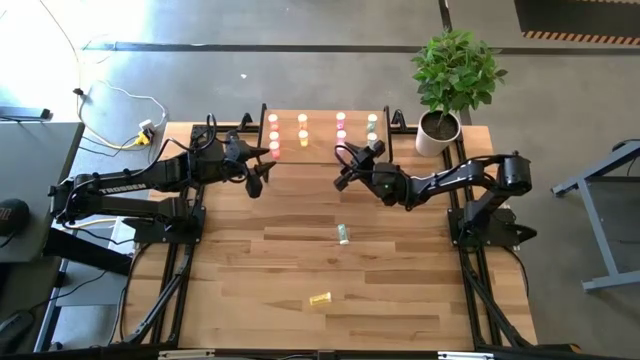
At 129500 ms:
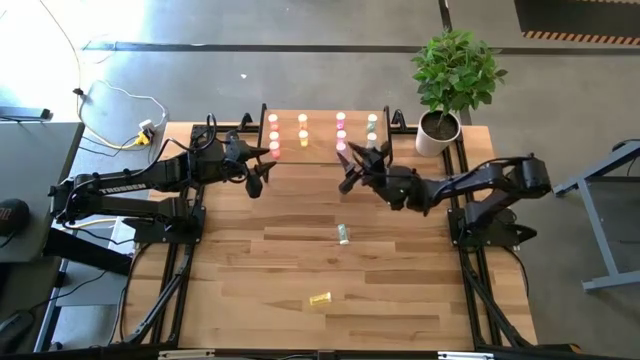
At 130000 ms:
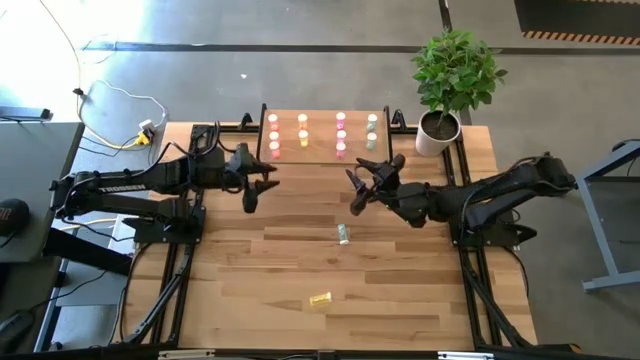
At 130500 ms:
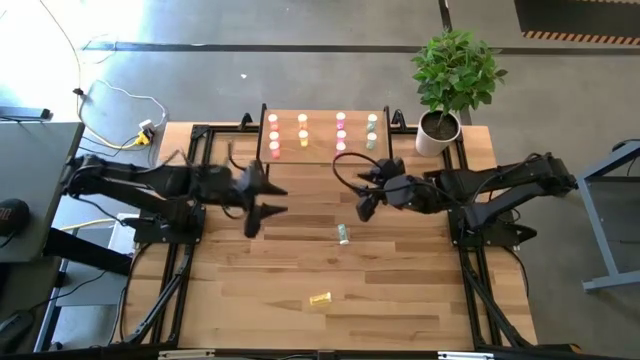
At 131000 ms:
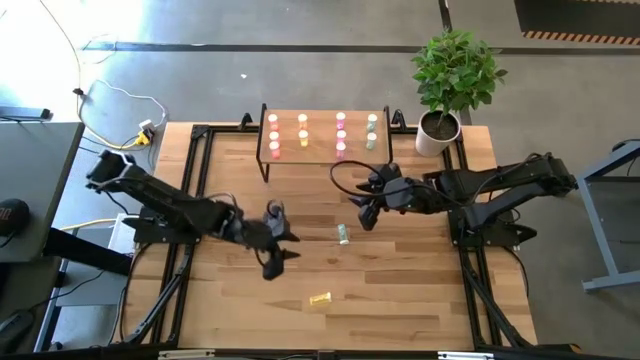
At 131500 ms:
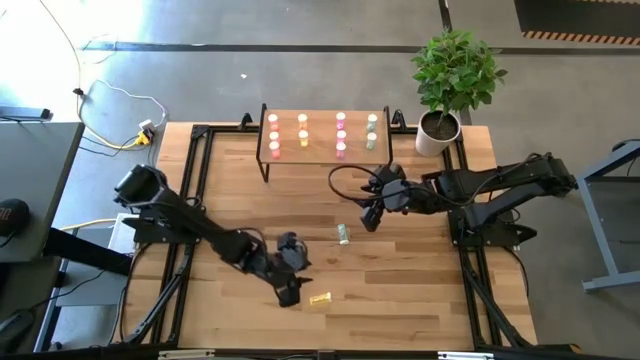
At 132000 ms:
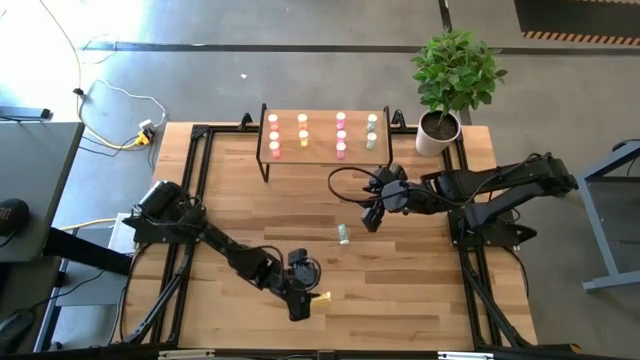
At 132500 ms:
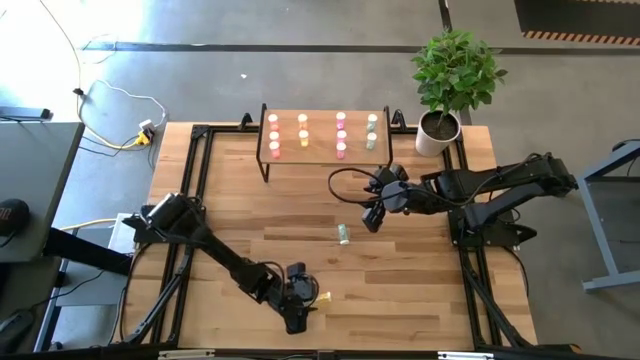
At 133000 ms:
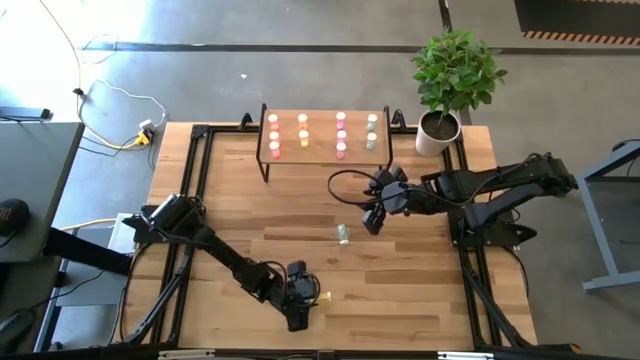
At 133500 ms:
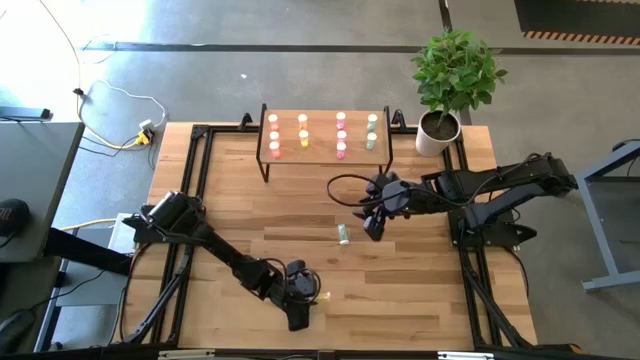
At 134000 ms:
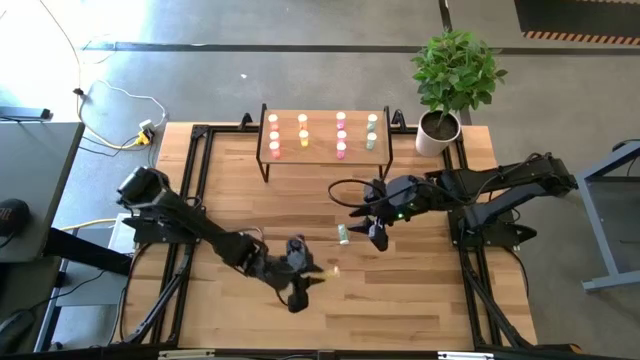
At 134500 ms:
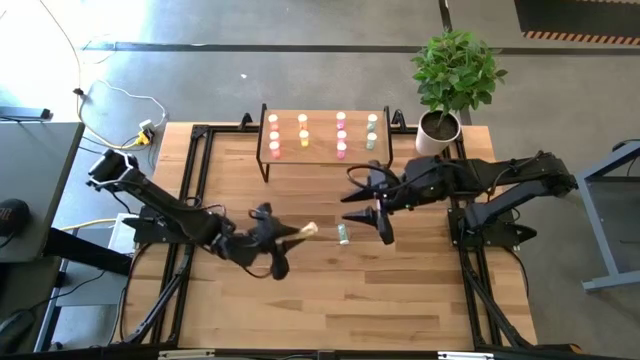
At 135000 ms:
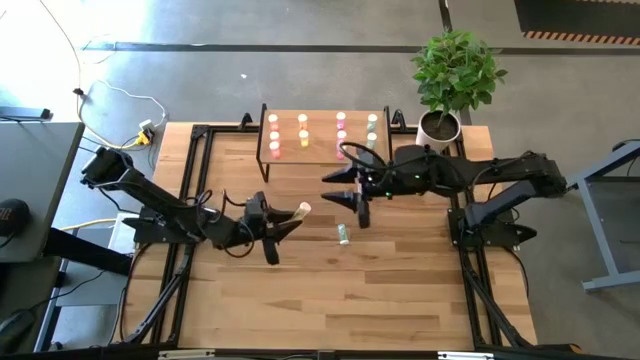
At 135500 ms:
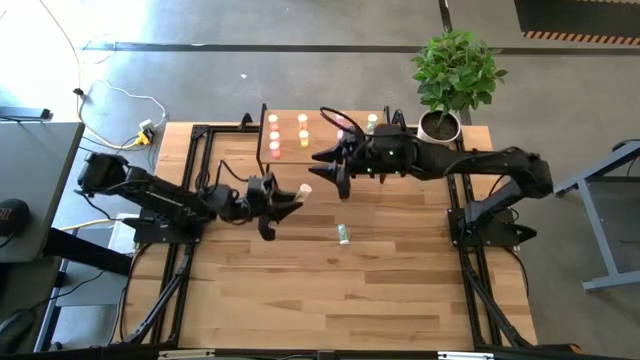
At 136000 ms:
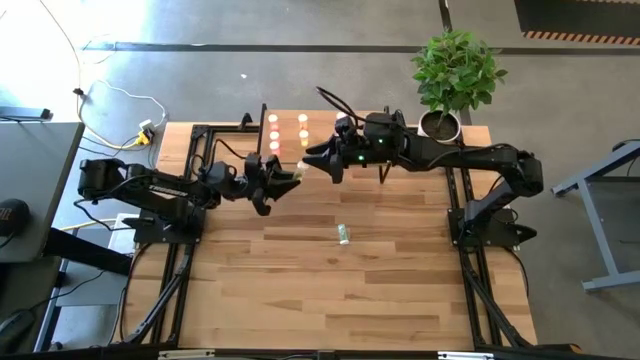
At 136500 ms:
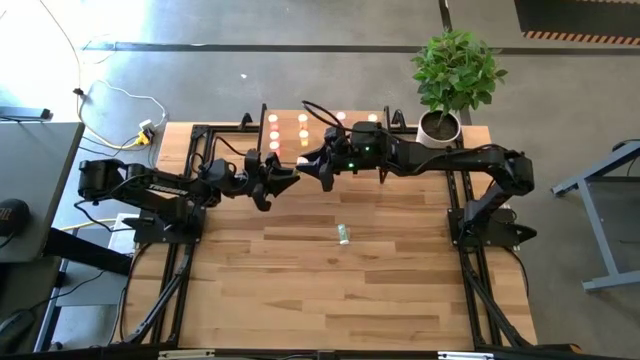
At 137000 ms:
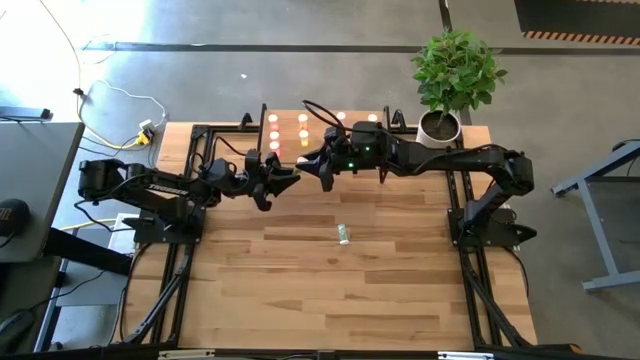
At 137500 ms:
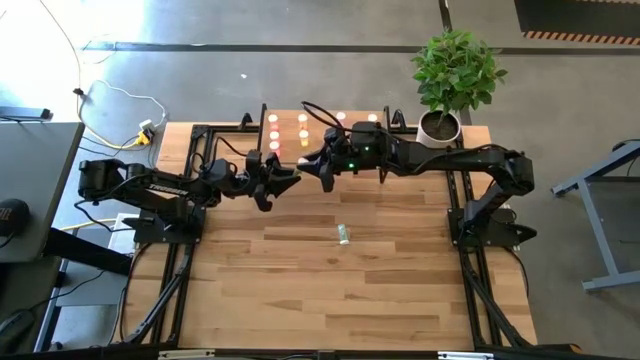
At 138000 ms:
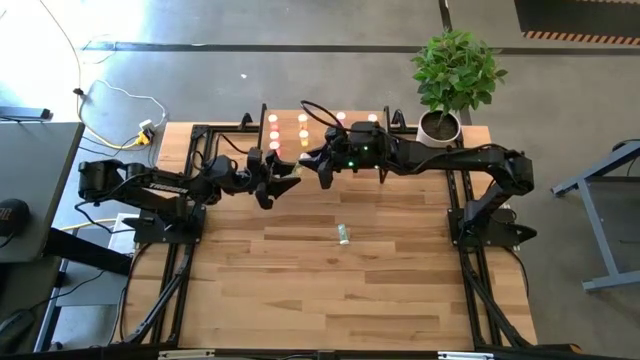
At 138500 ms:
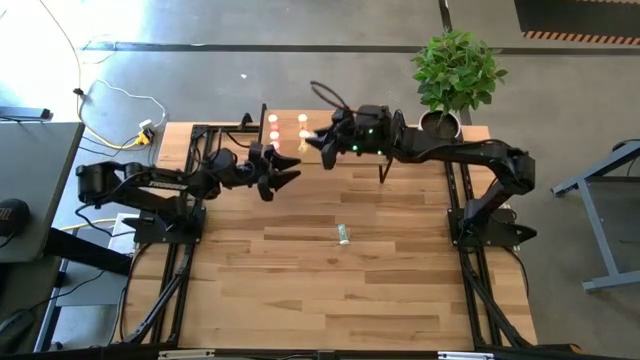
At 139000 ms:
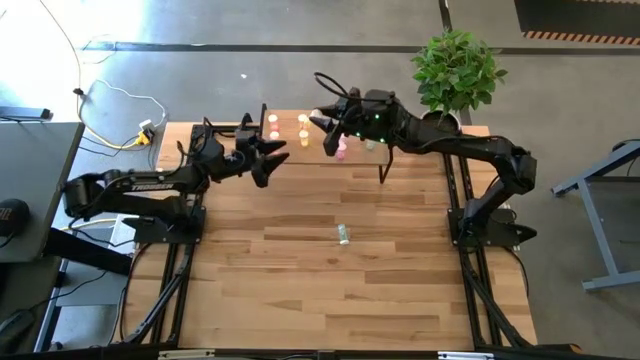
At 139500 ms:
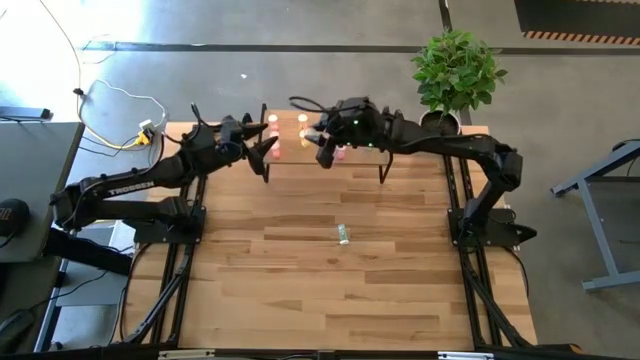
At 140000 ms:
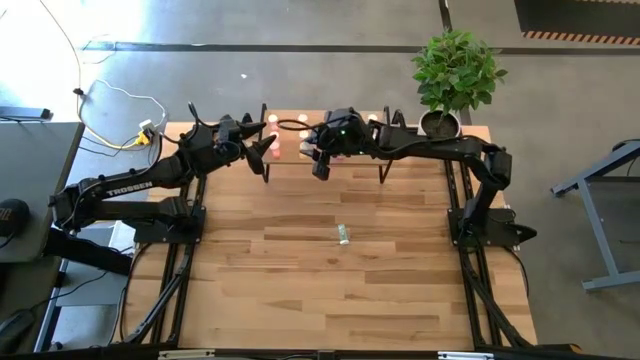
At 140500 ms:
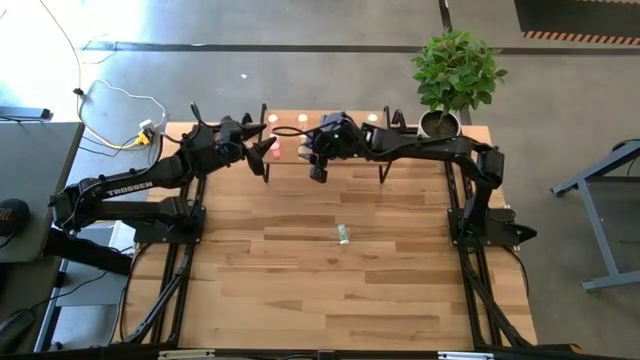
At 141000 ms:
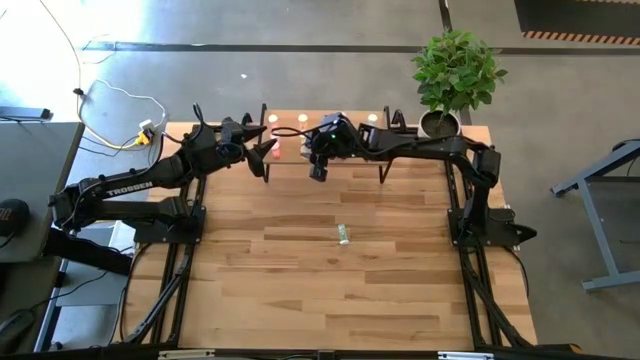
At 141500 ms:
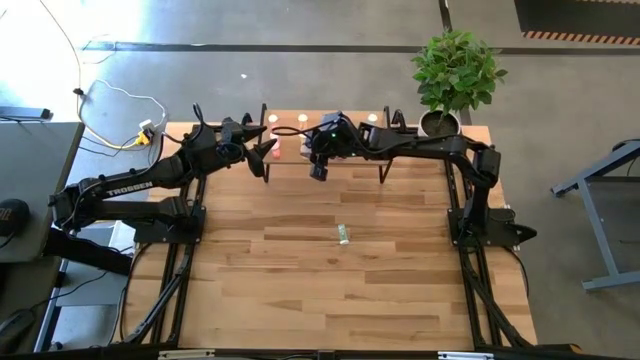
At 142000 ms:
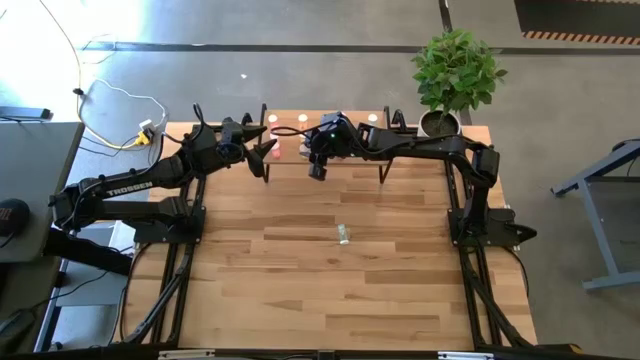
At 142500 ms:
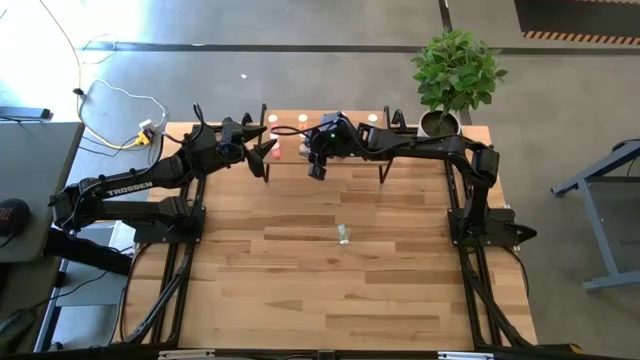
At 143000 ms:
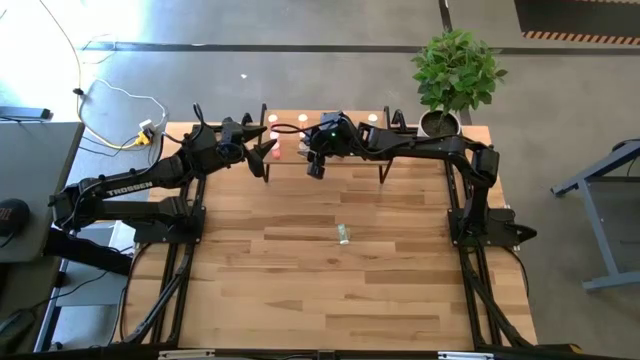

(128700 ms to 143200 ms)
Task: Pick and place medicine bottles onto shelf by color
Put the yellow pill bottle on the shelf aligned with the other yellow pill bottles

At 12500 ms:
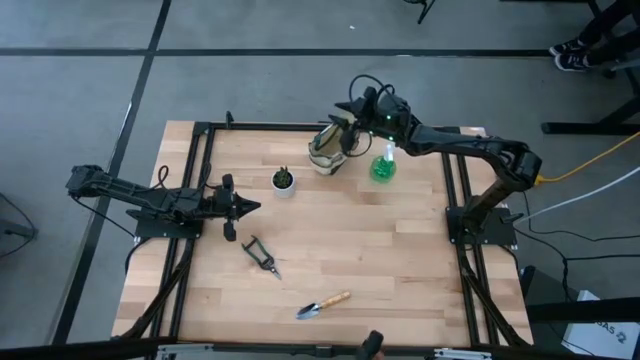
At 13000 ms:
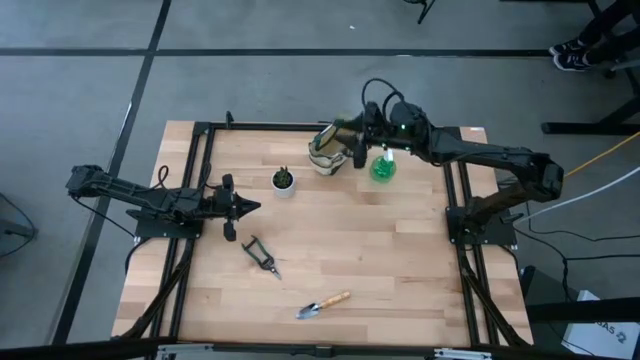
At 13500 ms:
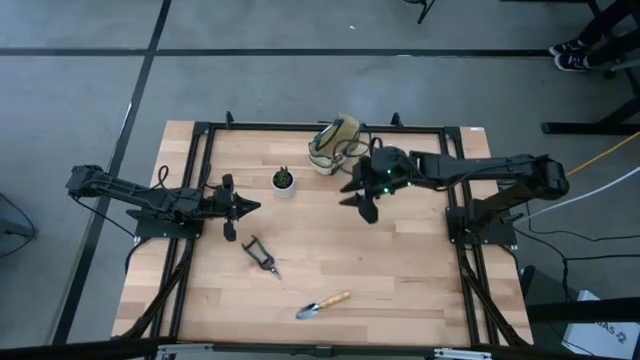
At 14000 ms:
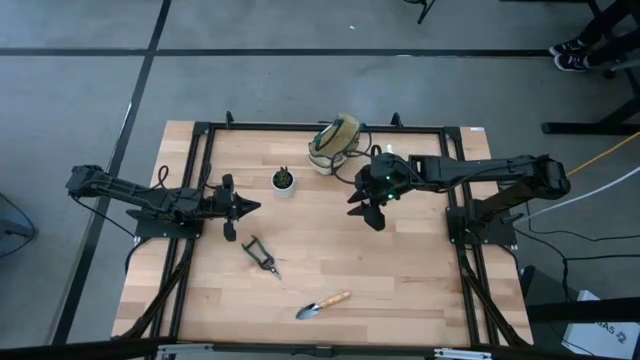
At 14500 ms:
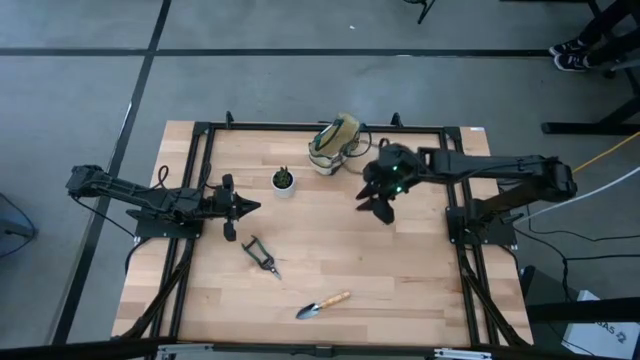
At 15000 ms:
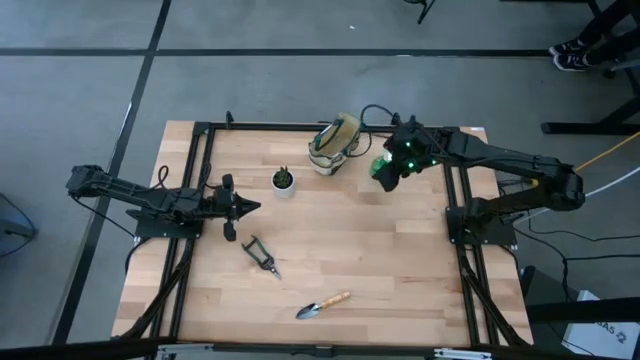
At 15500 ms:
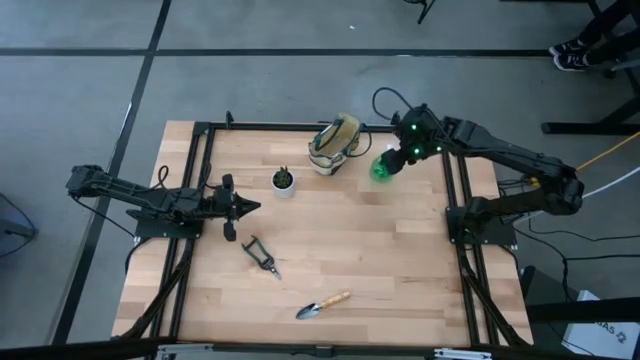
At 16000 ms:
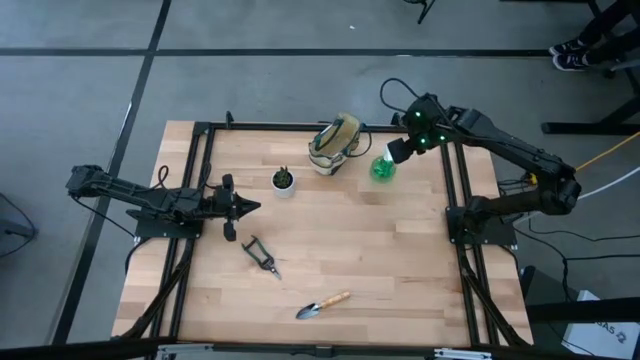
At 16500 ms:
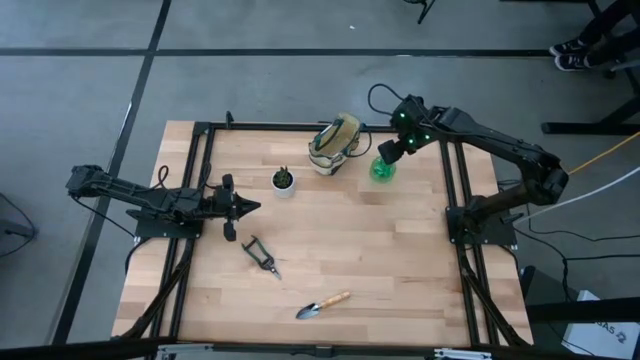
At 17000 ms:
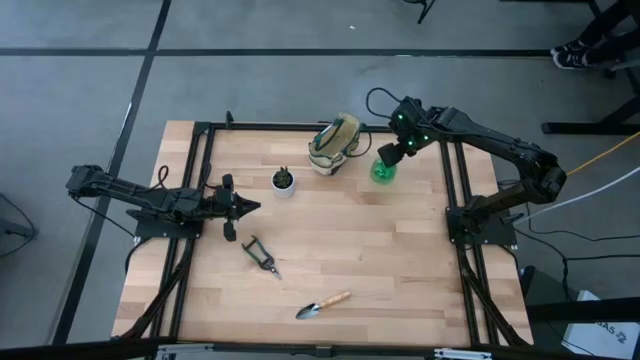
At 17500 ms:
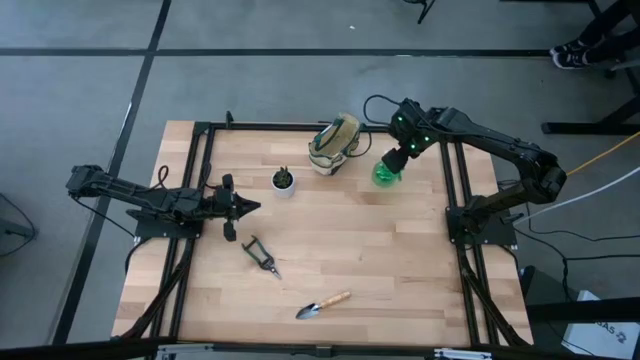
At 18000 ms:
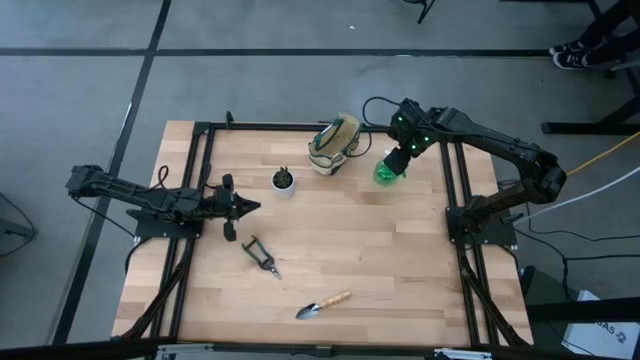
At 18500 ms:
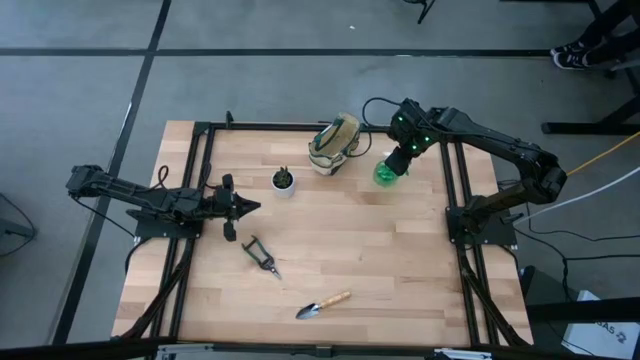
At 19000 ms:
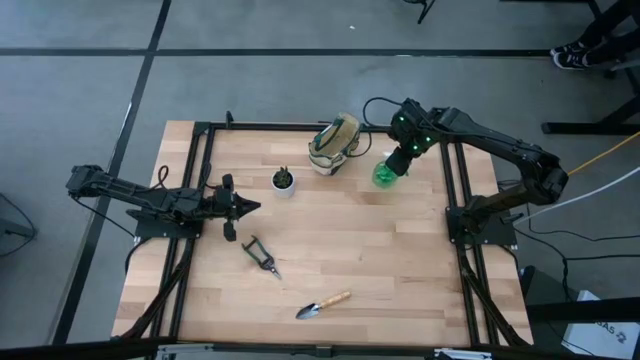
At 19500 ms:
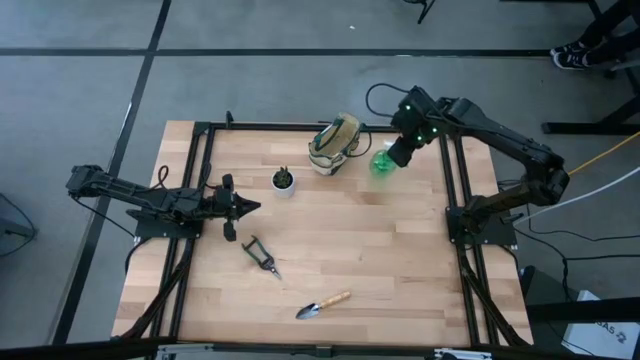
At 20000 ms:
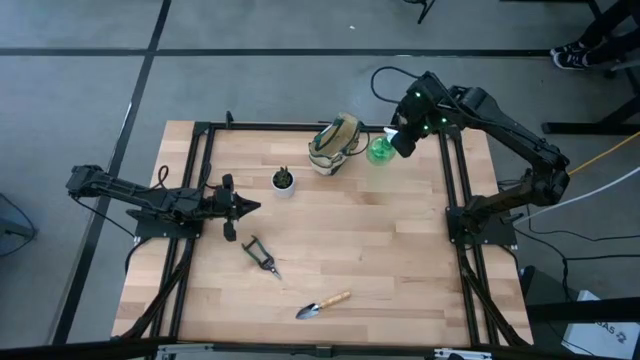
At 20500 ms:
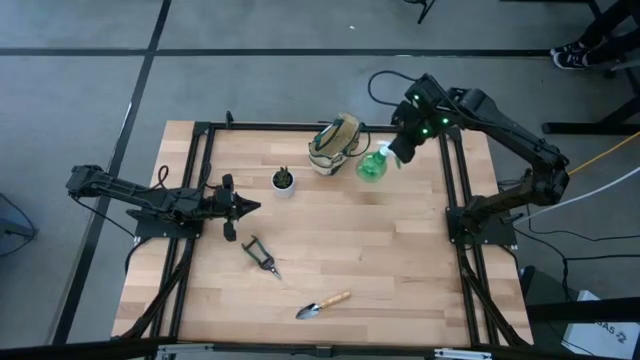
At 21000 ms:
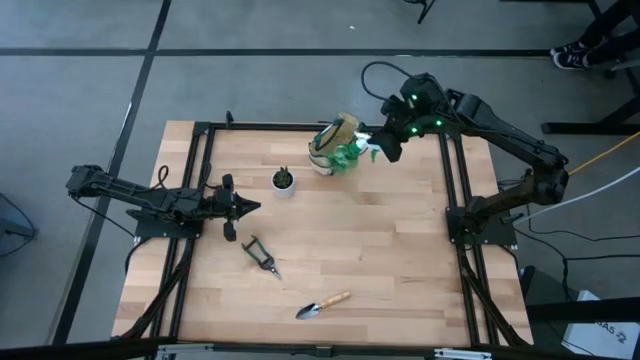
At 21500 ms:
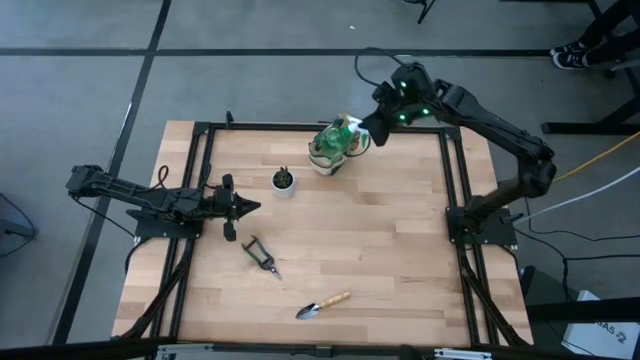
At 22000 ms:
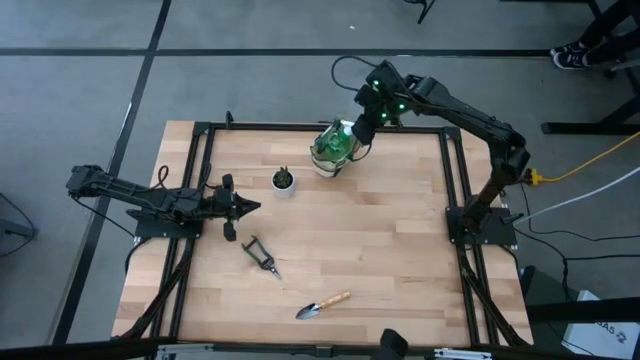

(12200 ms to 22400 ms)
Task: Pick & Place Garden tools in Gardening bag
Put the spray bottle into the gardening bag
